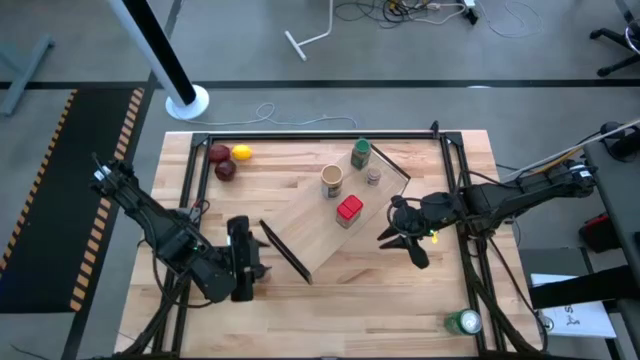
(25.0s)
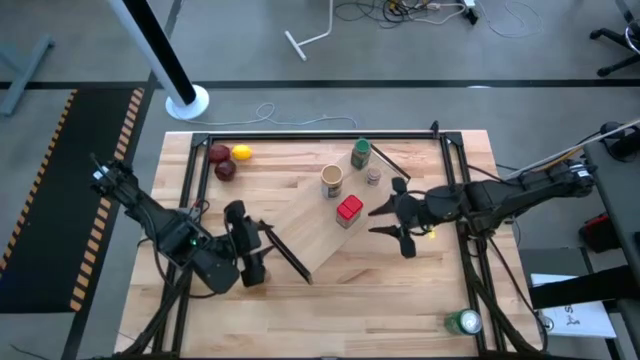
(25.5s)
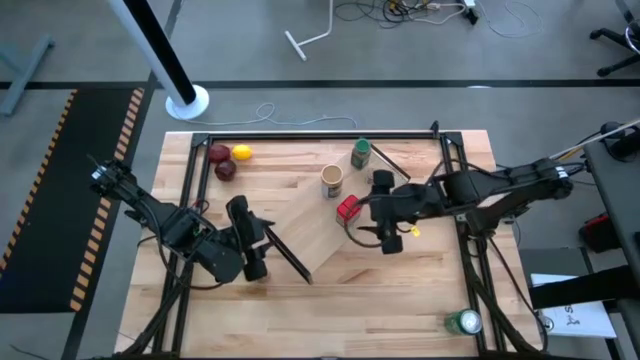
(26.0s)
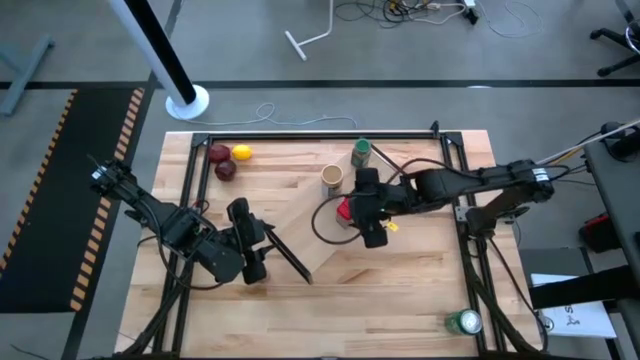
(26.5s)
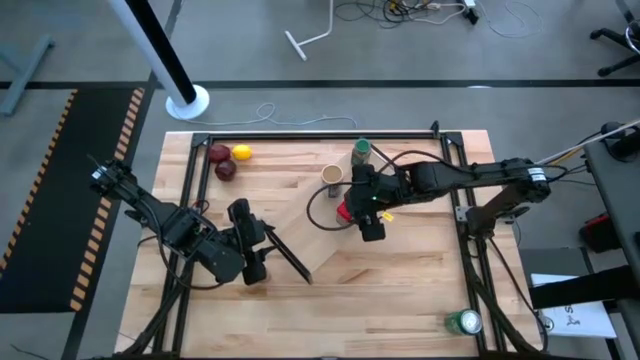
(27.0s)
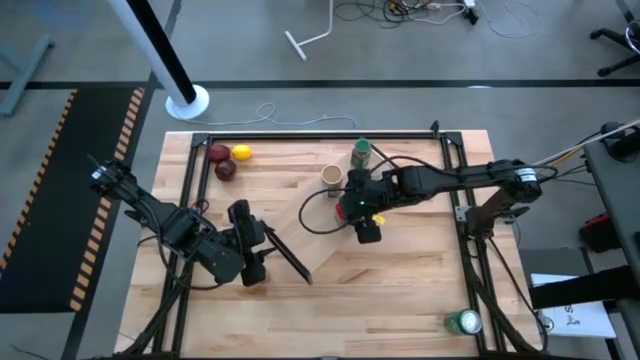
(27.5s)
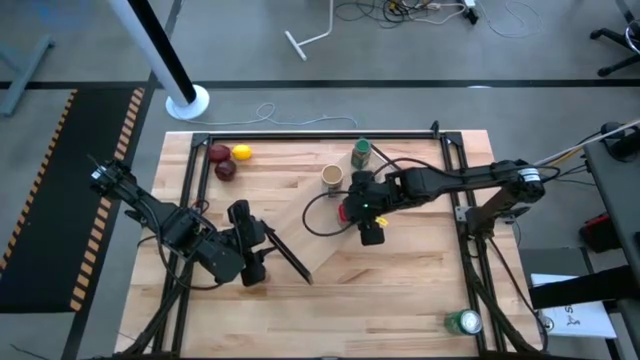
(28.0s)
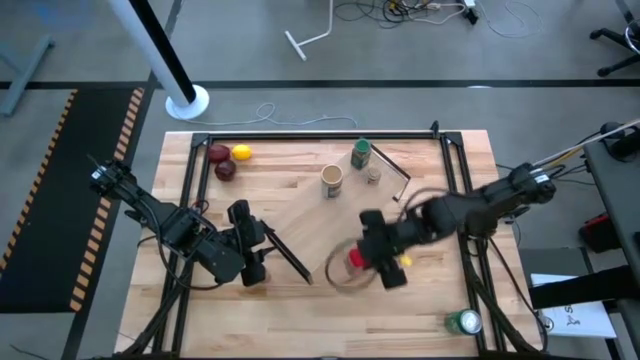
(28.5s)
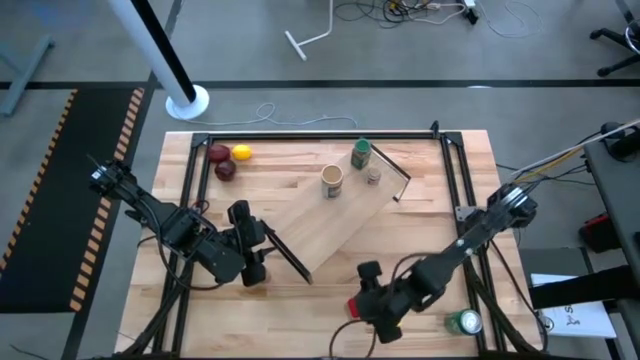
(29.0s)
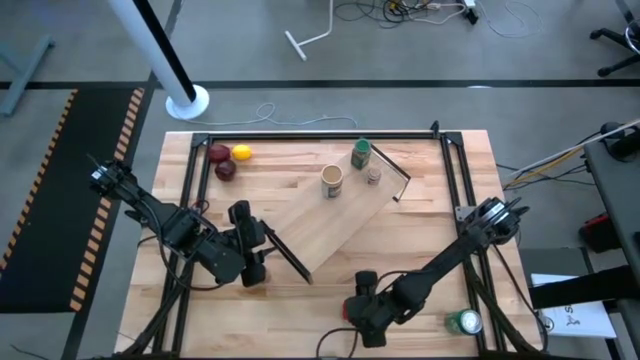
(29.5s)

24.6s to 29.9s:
Task: Shelf spices
Remove the red seasoning can from the shelf

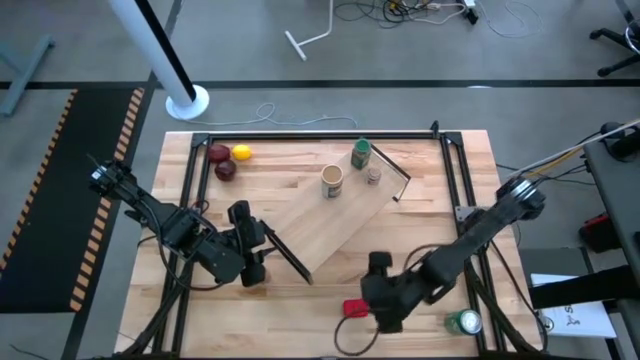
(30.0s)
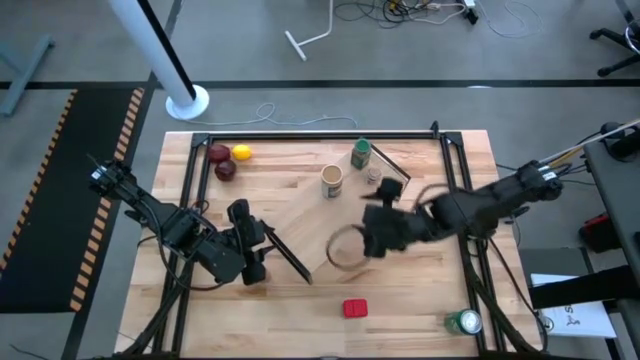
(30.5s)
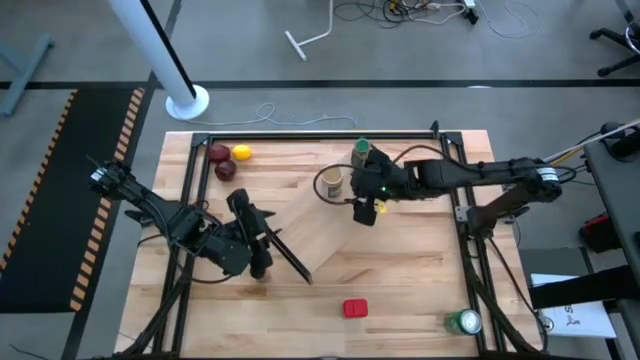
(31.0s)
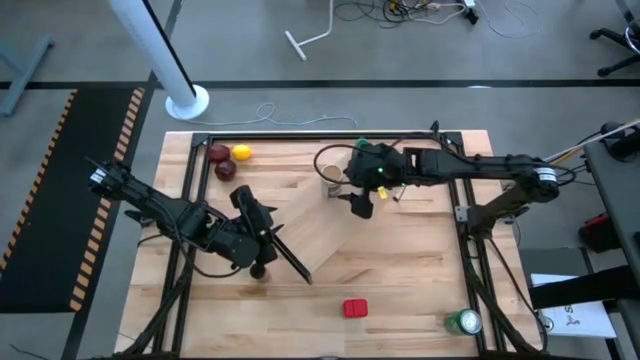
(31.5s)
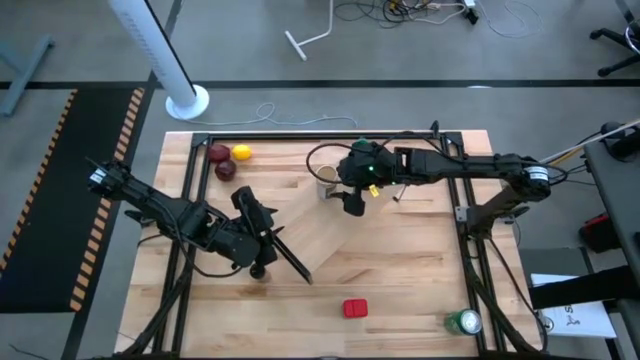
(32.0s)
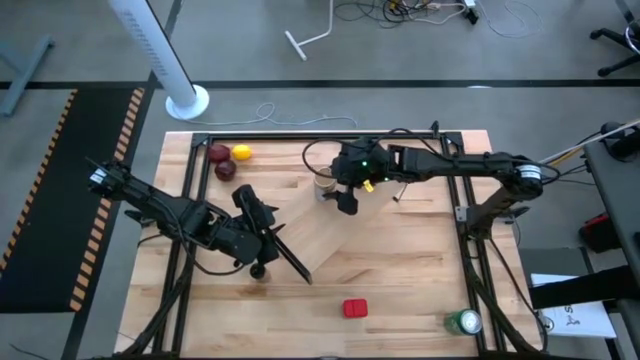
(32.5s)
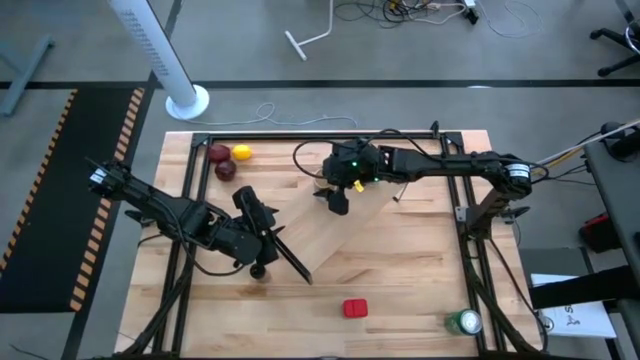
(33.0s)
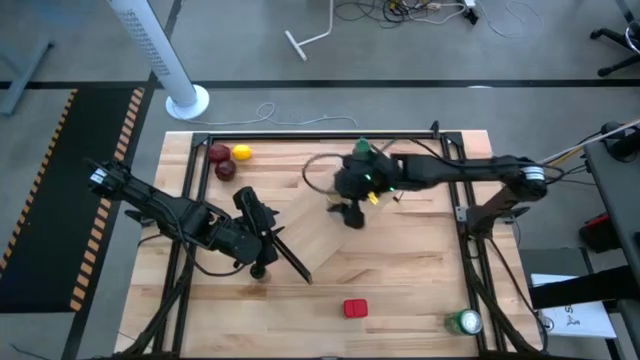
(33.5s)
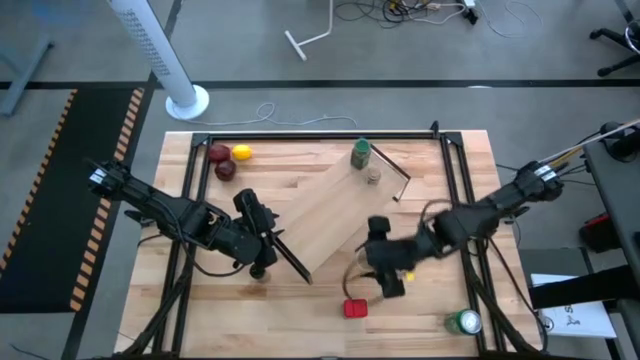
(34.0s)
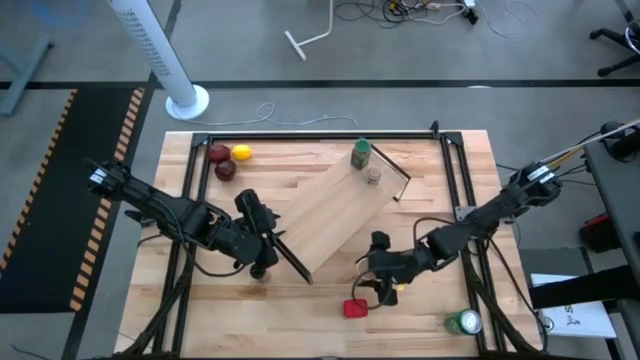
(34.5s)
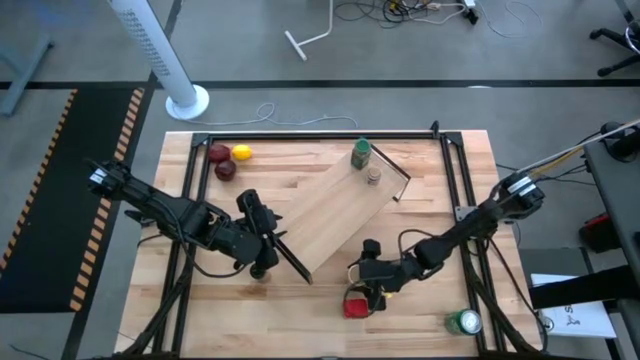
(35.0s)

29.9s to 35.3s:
Remove the gold seasoning bottle from the shelf

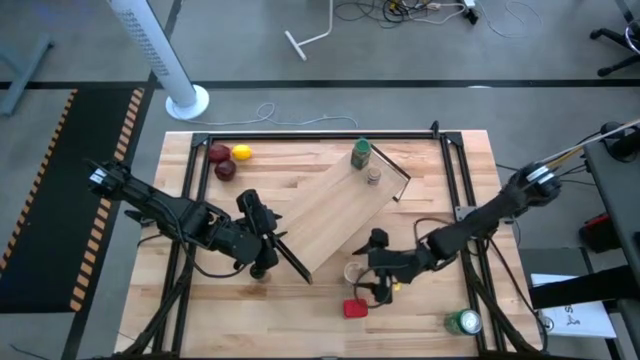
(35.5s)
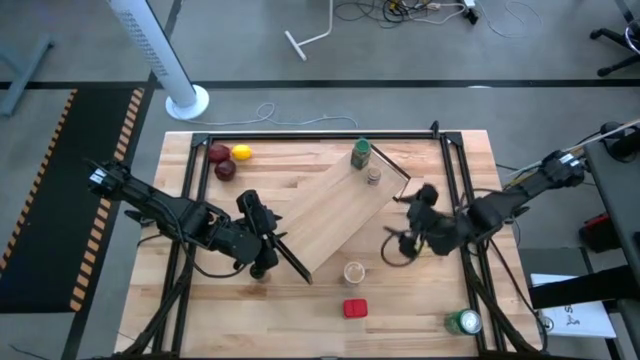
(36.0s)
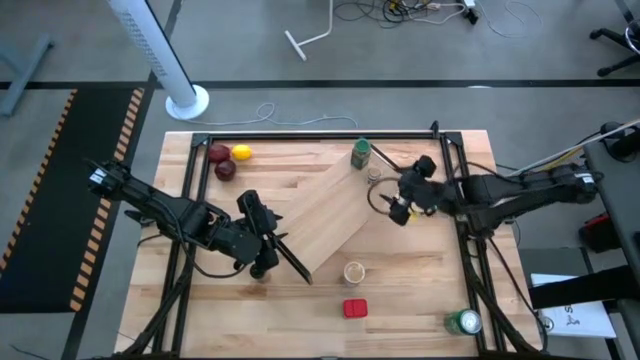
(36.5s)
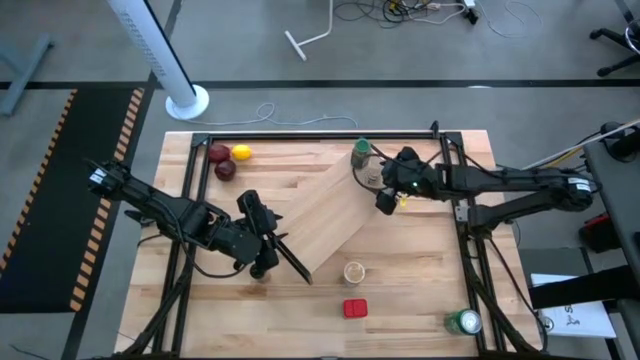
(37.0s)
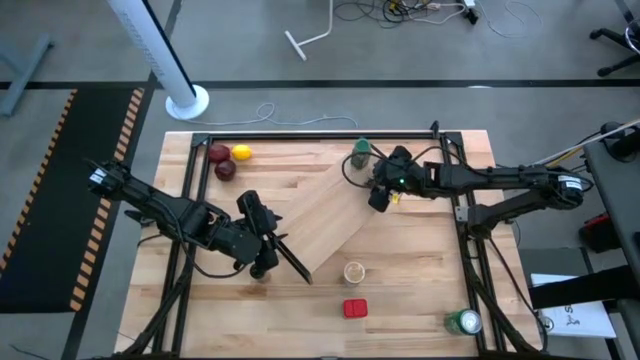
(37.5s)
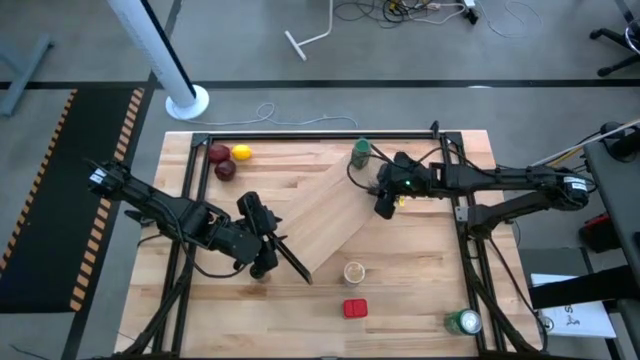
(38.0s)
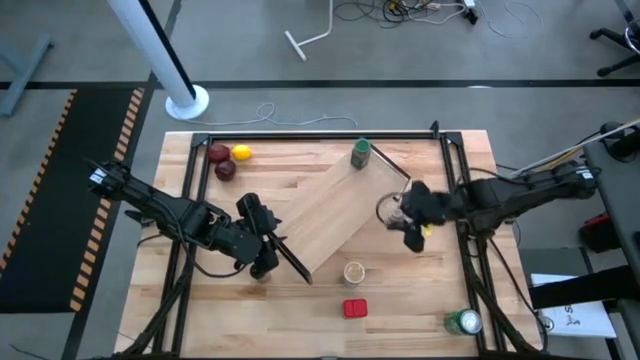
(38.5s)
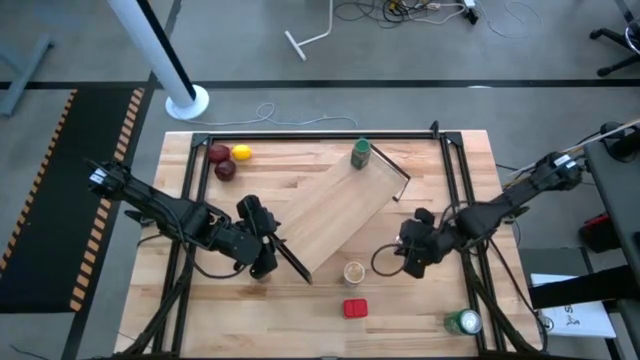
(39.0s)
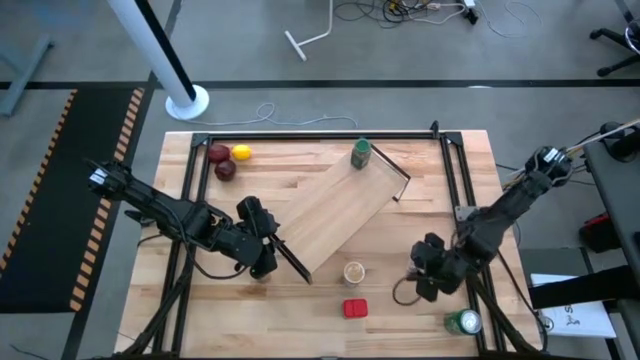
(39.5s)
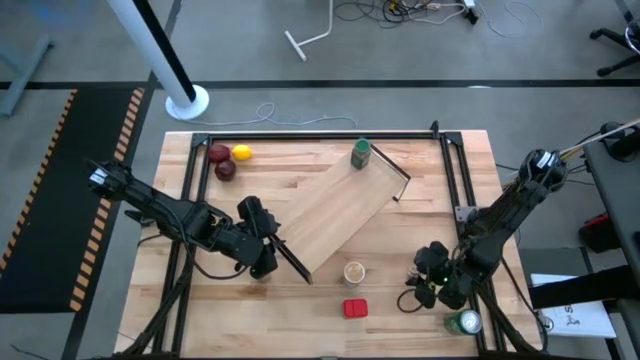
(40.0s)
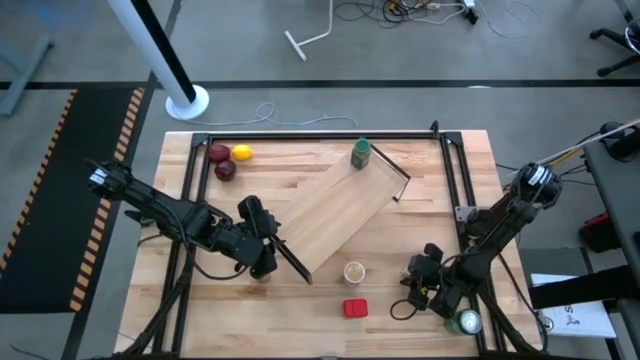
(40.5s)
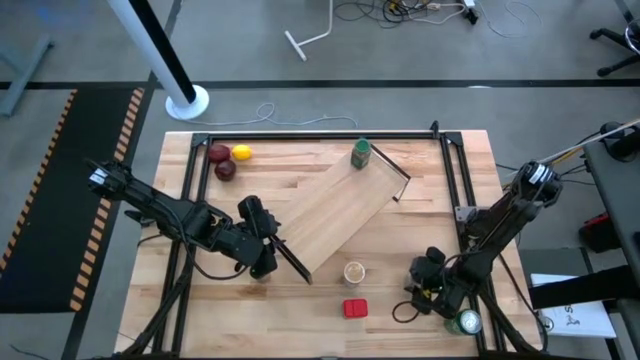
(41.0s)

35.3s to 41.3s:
Remove the brown seasoning bottle from the shelf

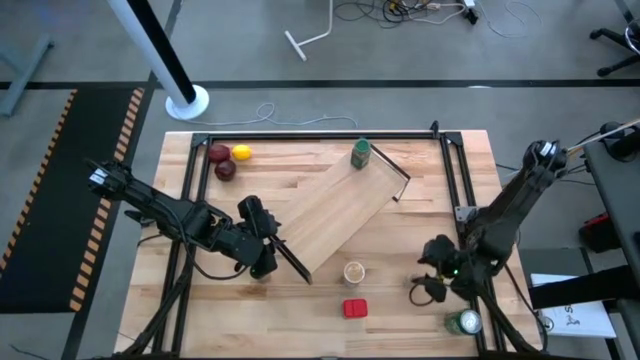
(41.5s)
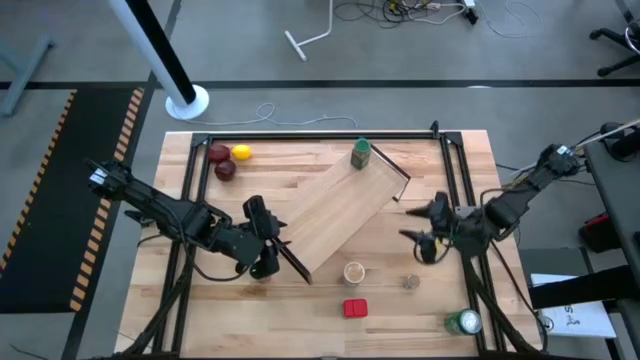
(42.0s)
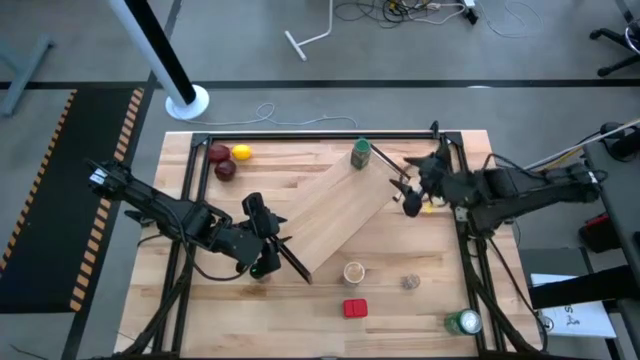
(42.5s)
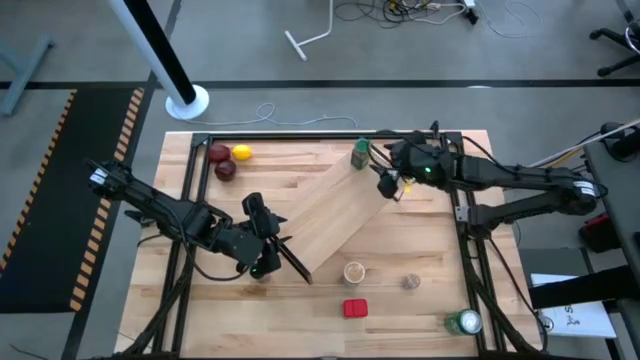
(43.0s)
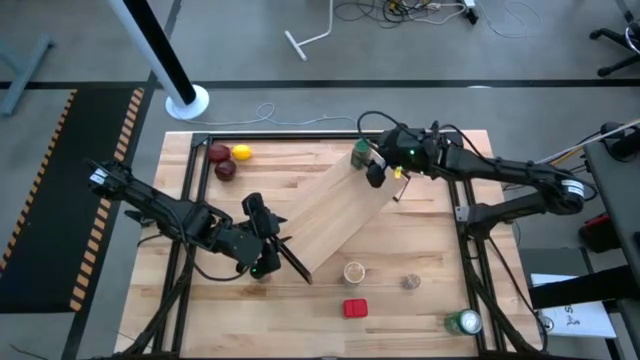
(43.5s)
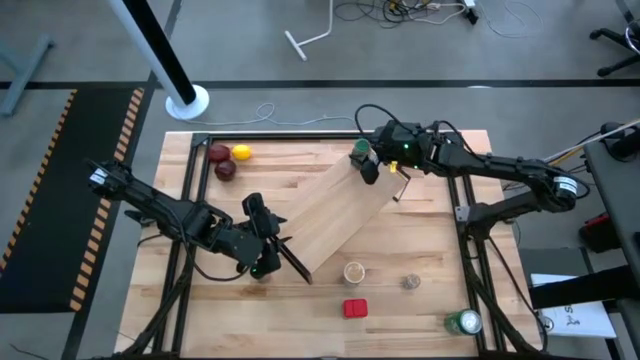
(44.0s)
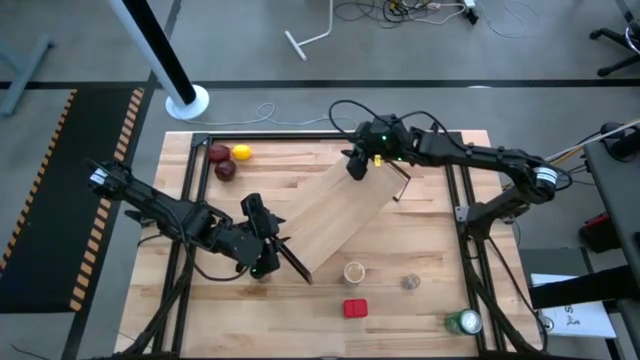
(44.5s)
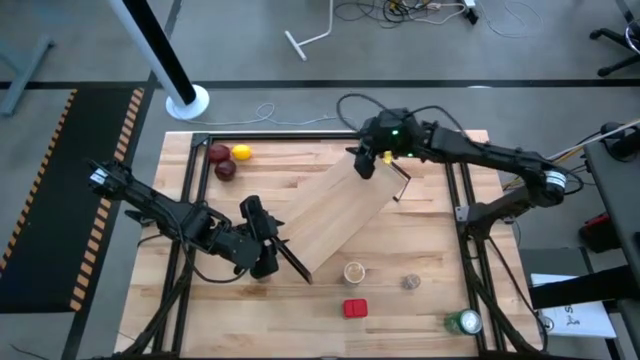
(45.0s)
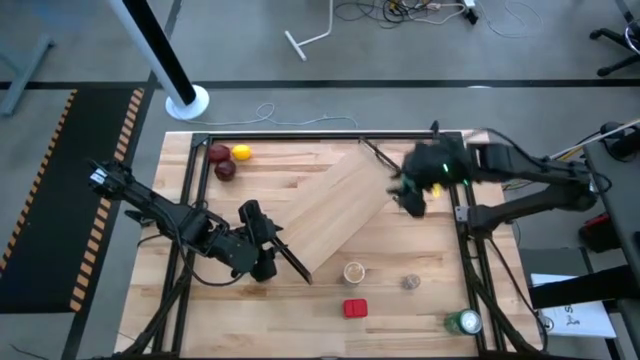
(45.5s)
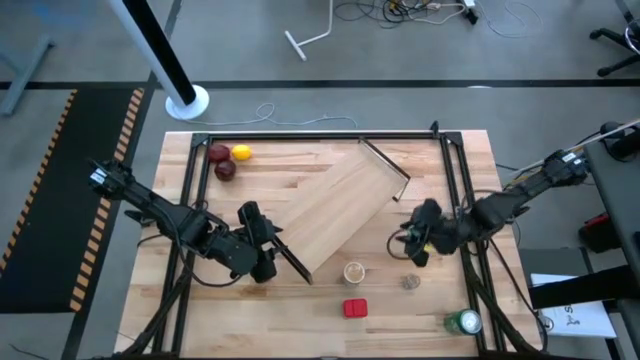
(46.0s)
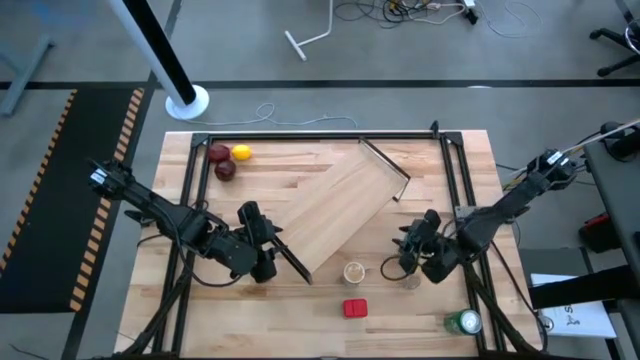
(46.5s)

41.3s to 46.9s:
Remove the green seasoning bottle from the shelf
